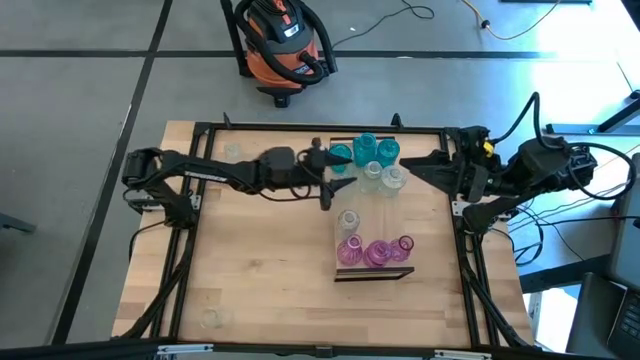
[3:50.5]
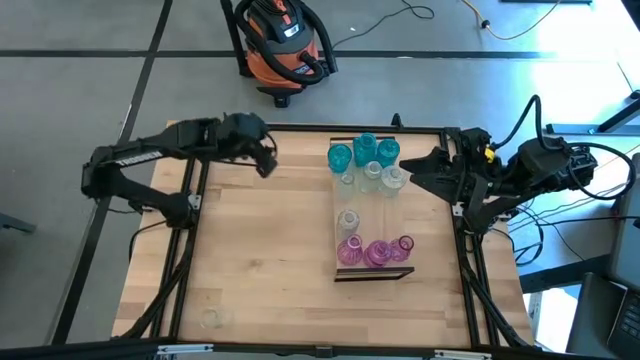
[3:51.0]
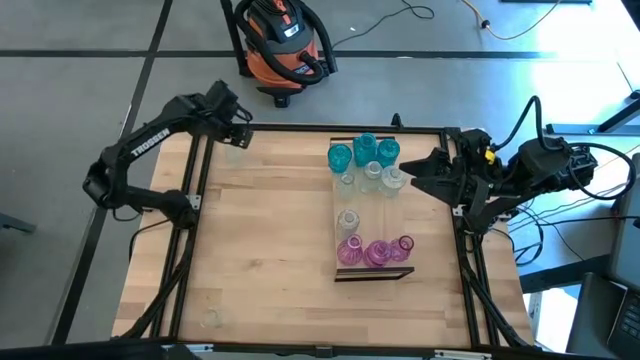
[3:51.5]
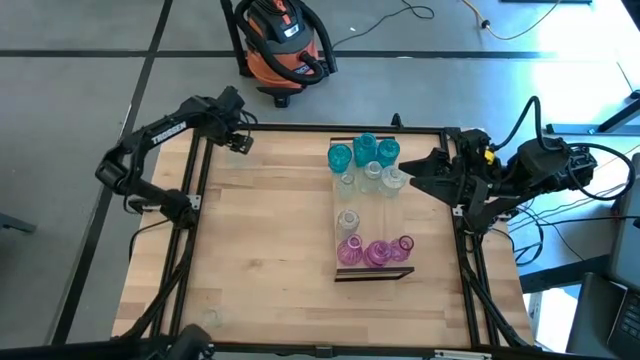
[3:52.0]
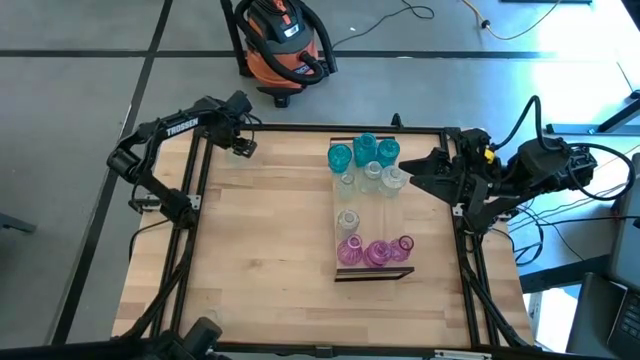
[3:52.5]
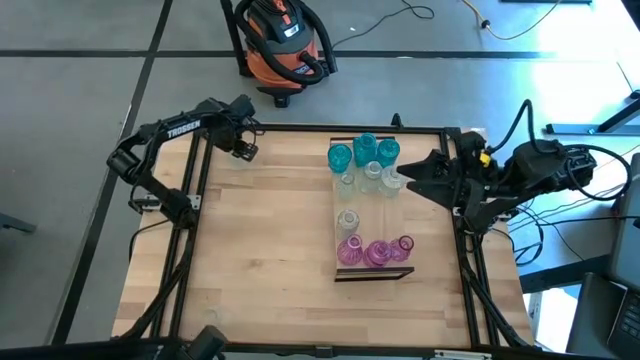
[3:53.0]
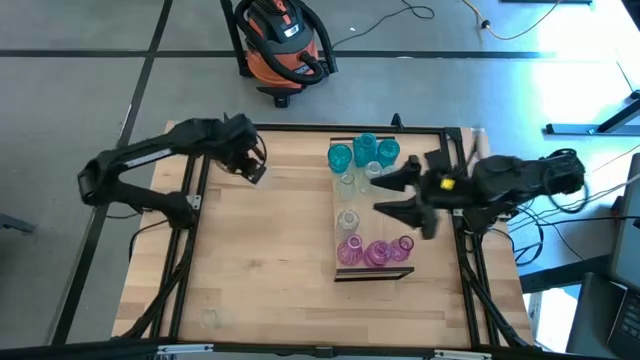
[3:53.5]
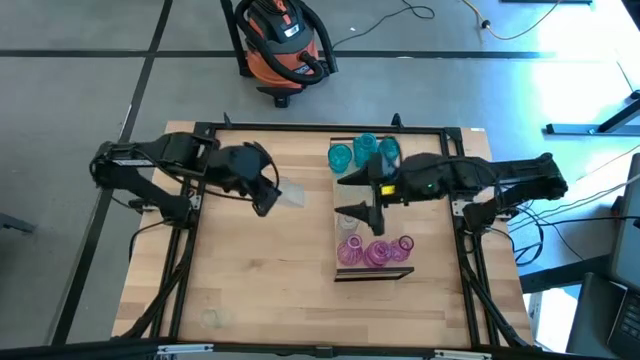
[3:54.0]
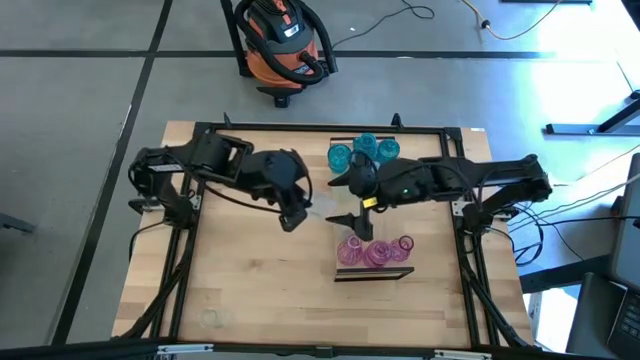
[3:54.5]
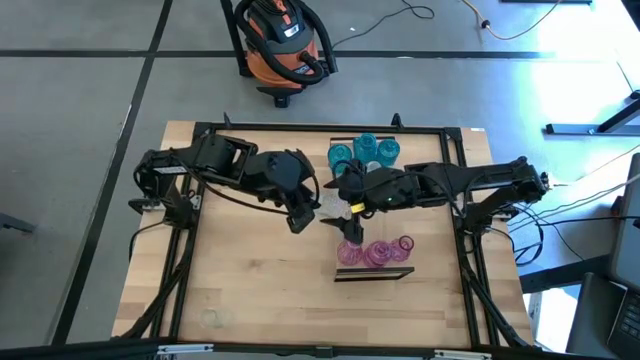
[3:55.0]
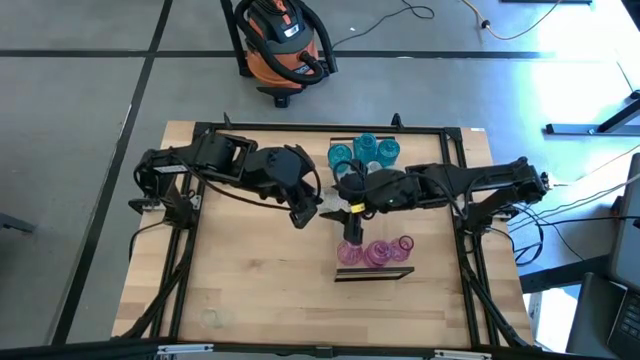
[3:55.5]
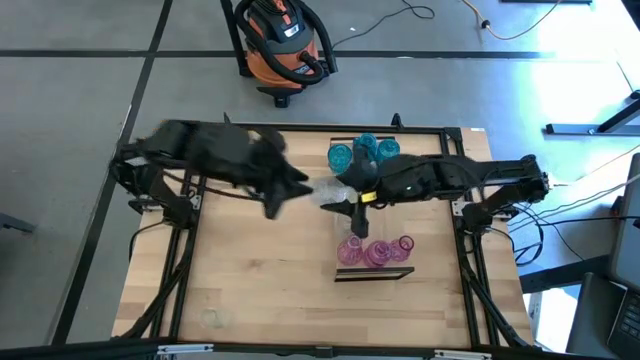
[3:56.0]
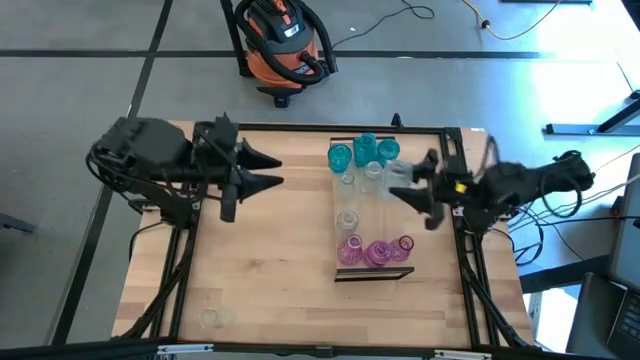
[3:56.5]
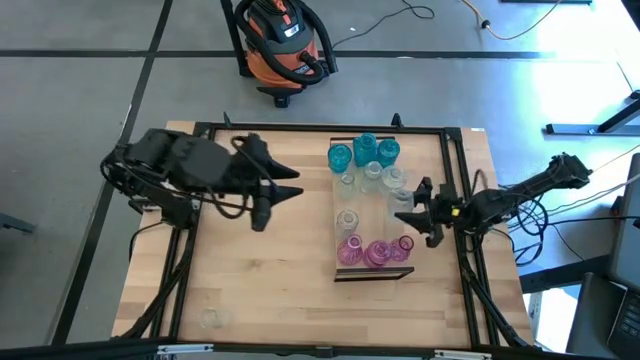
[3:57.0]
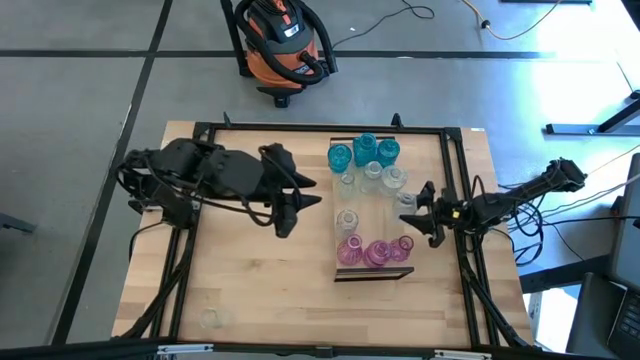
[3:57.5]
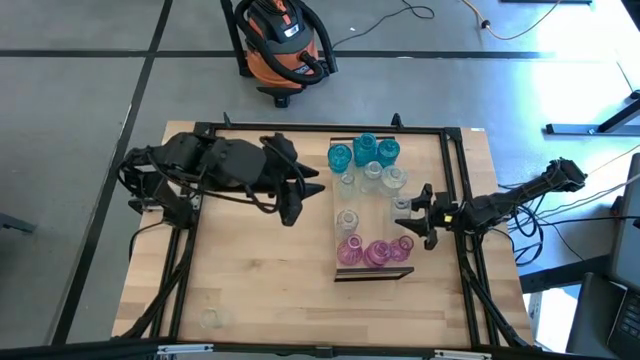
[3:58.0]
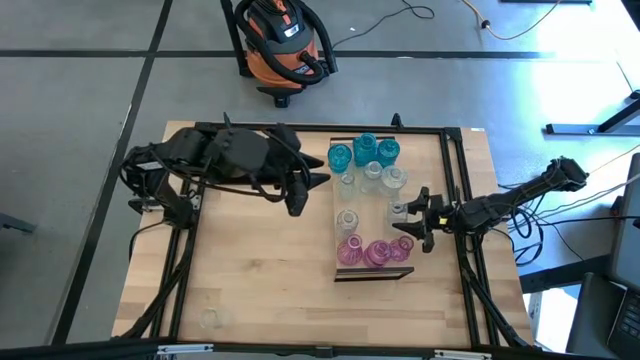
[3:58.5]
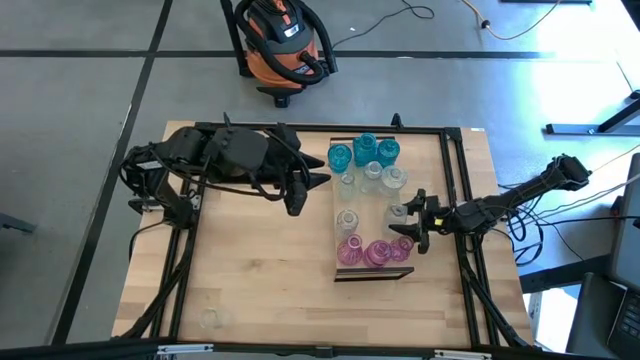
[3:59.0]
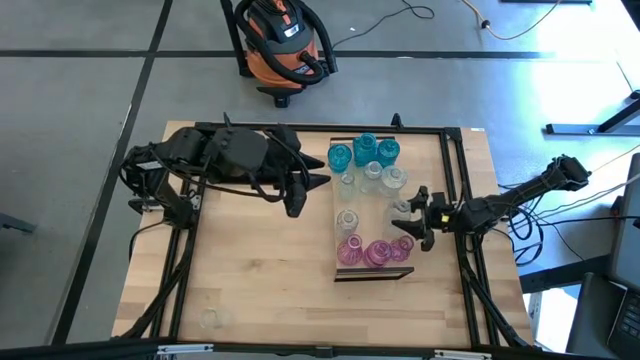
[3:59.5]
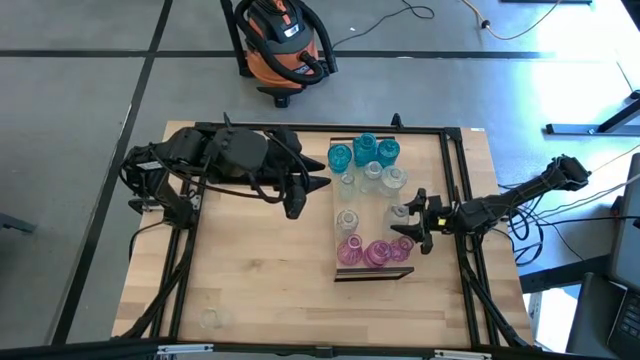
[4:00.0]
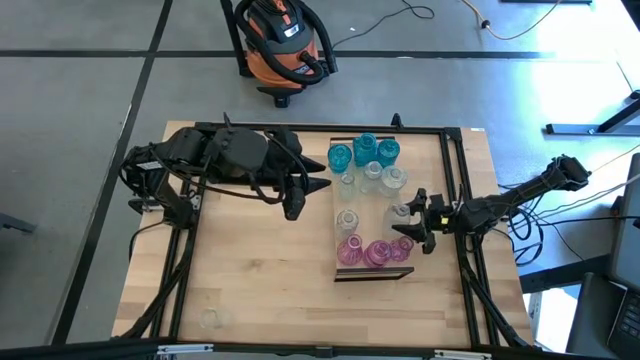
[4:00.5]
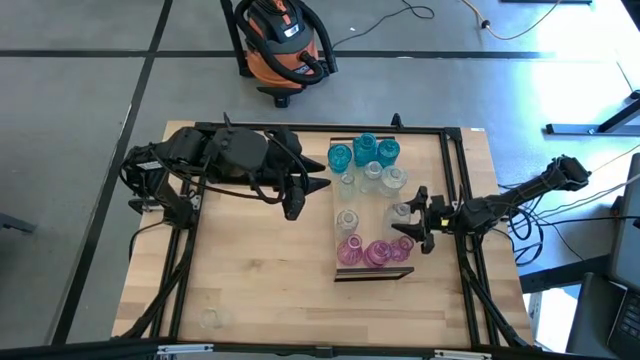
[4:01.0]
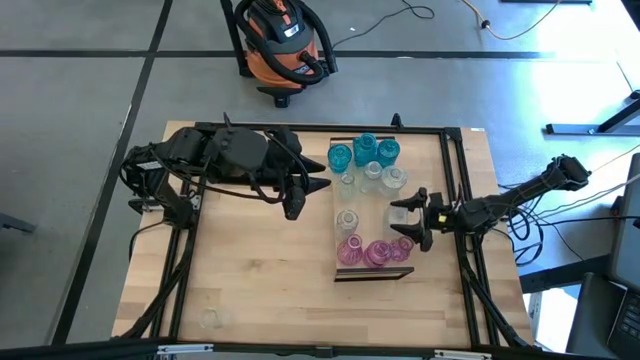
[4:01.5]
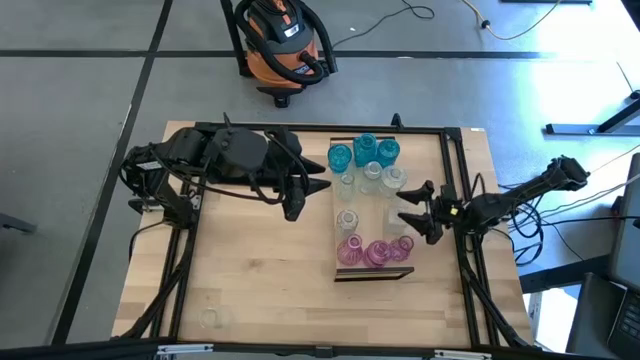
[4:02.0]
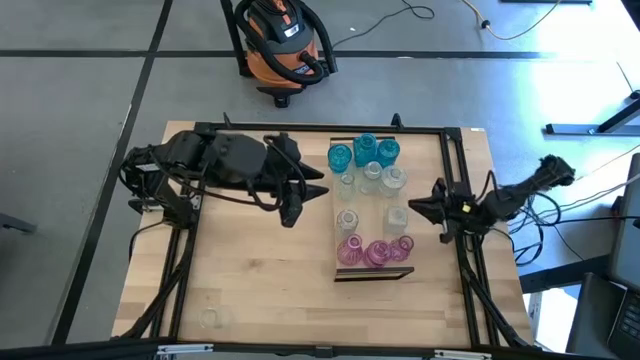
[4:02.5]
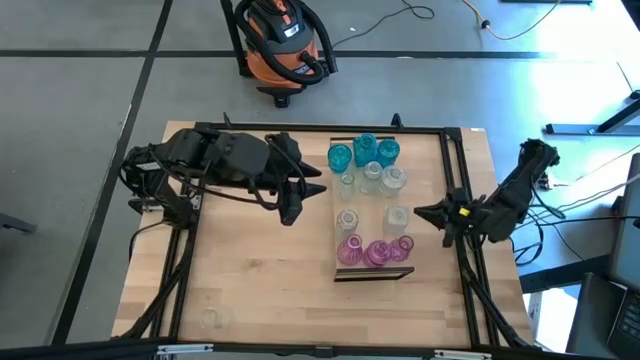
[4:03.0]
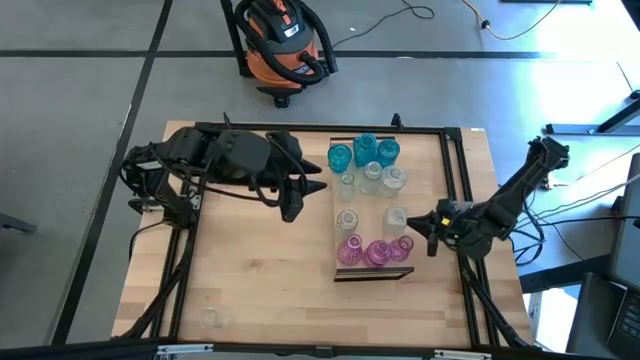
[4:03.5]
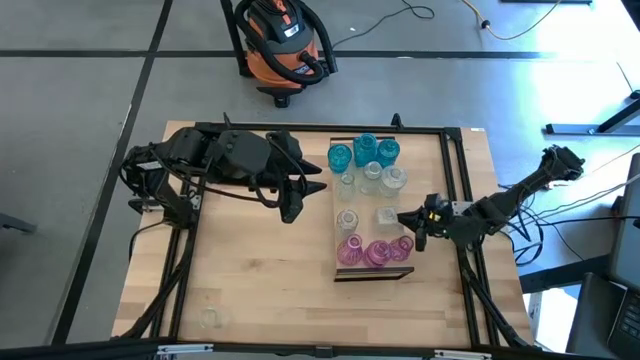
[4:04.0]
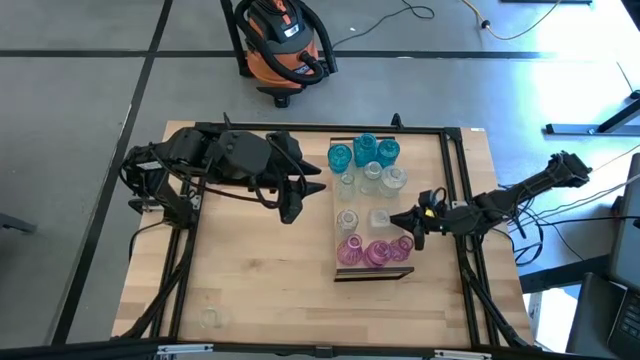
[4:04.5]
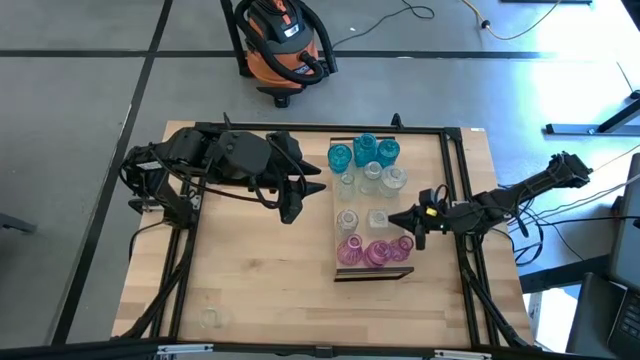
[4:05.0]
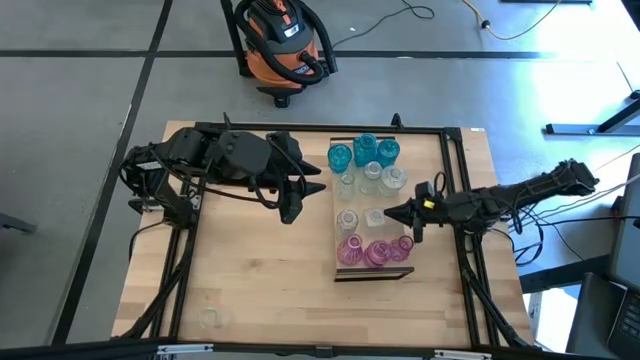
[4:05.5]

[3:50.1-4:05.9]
Task: sort vases onto shelf
Put the transparent vase on the shelf aligned with the other transparent vase

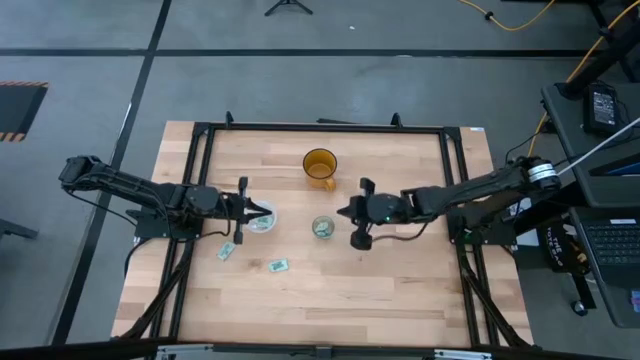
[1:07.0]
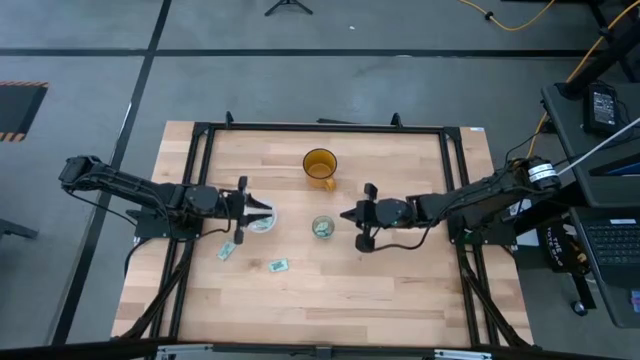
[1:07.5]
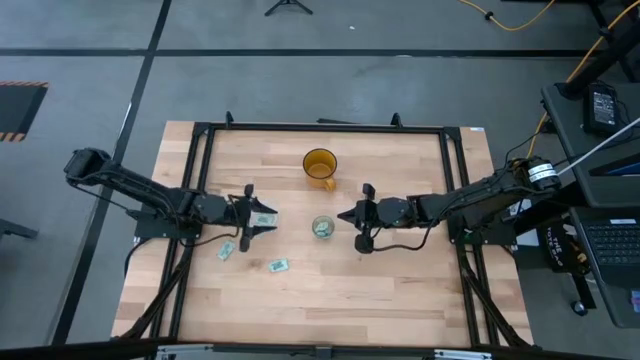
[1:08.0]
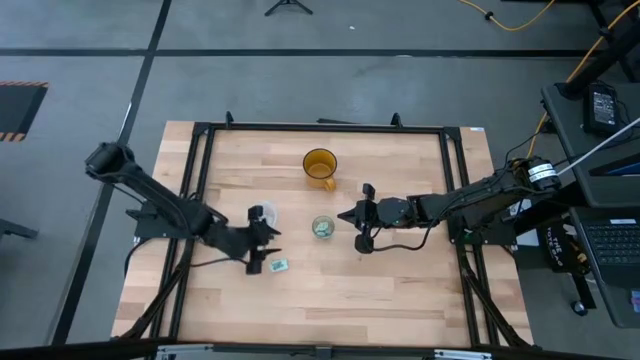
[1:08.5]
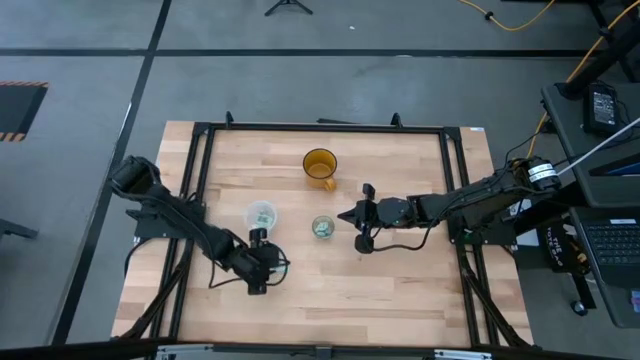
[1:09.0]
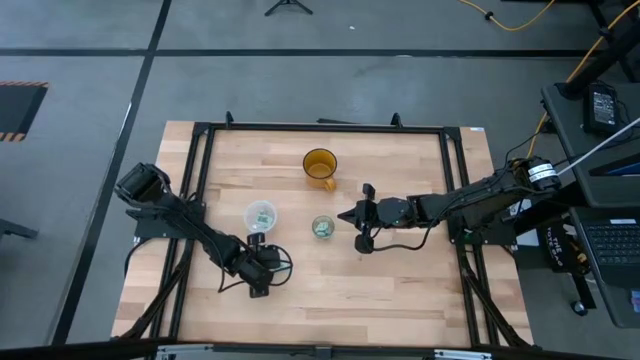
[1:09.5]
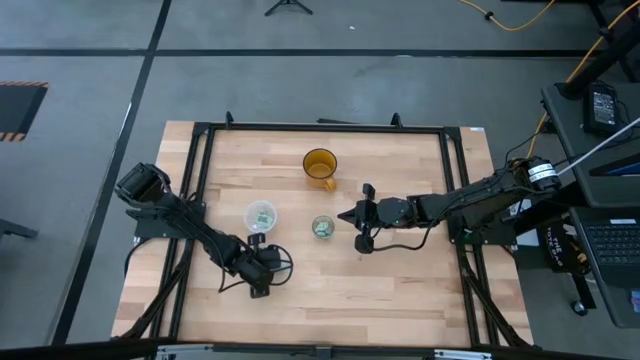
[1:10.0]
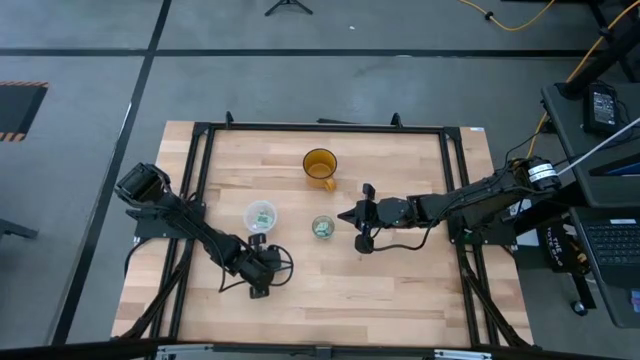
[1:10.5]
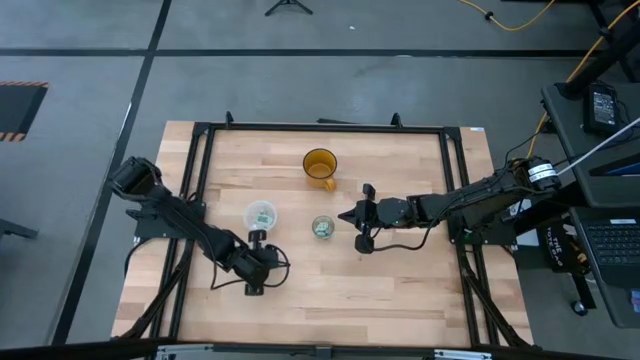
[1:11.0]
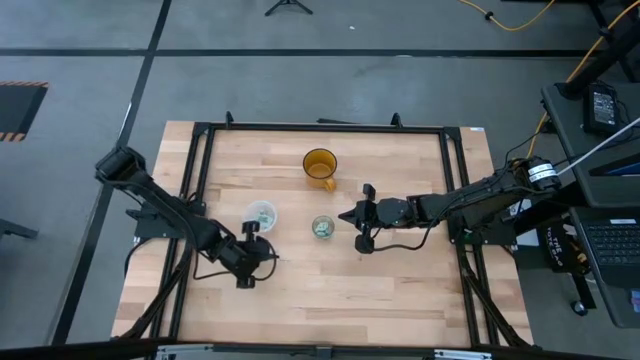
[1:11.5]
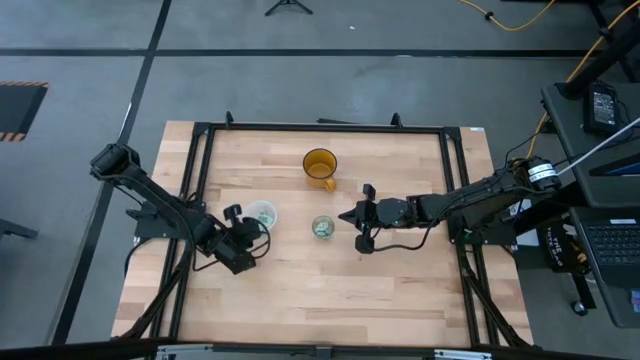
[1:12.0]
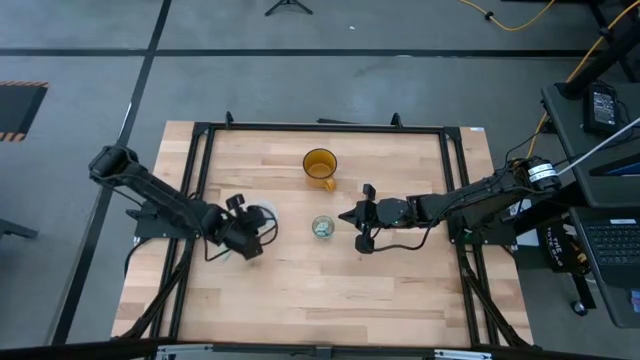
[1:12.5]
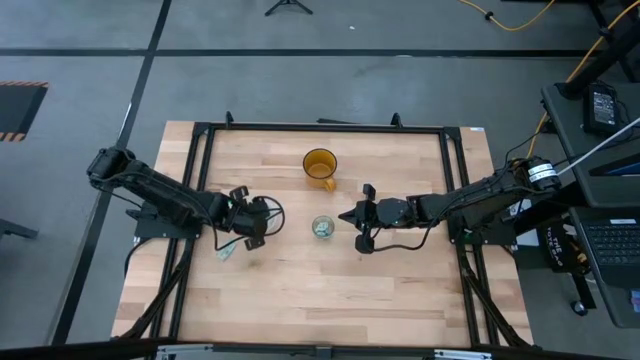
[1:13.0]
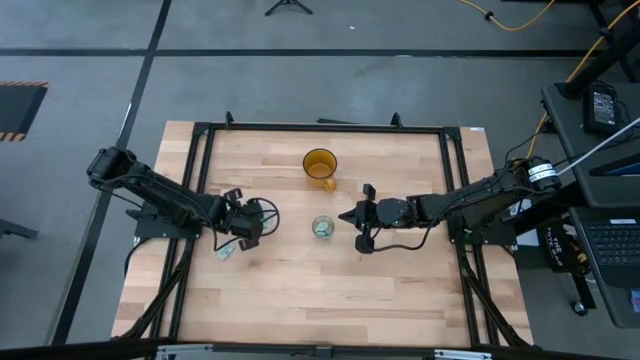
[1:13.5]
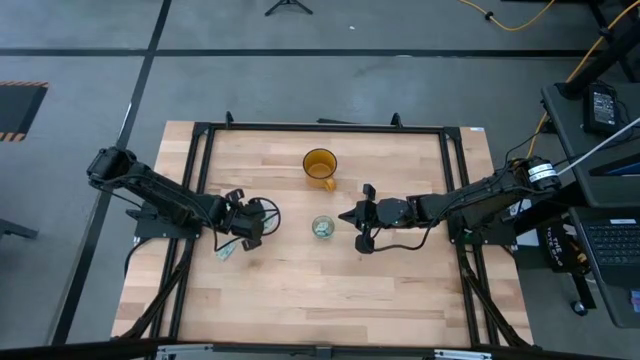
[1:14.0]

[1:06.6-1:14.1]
Task: Pick and place Stevia / Truvia into bins
Put the stevia packet into the plastic tupperware
